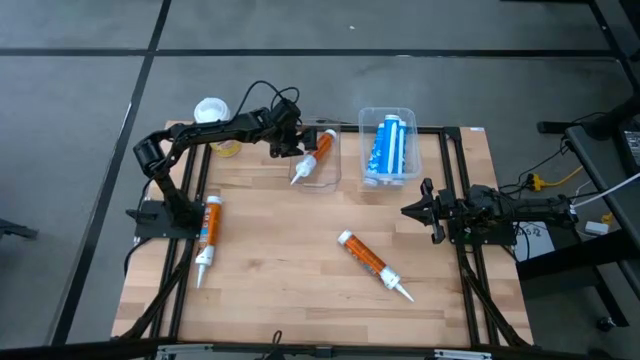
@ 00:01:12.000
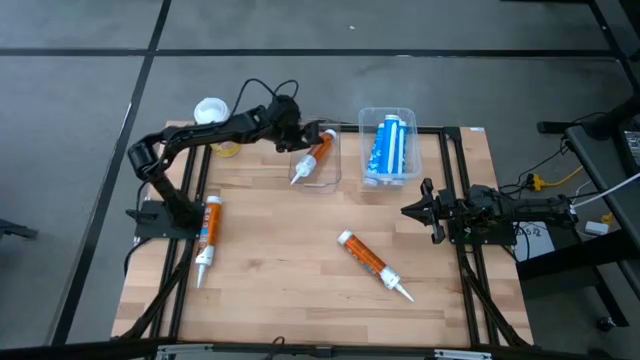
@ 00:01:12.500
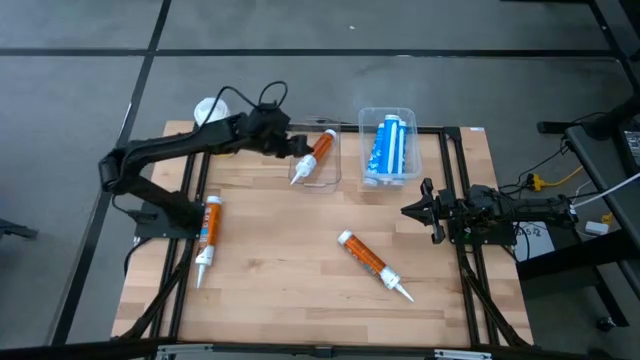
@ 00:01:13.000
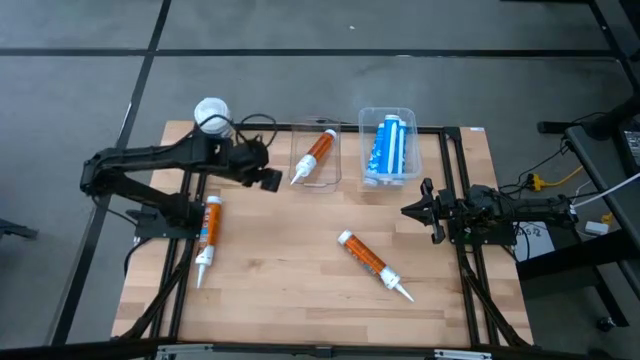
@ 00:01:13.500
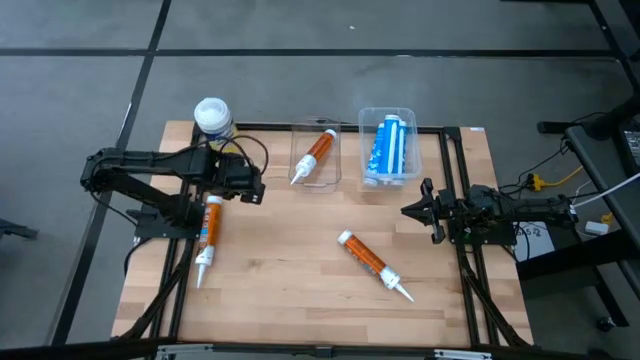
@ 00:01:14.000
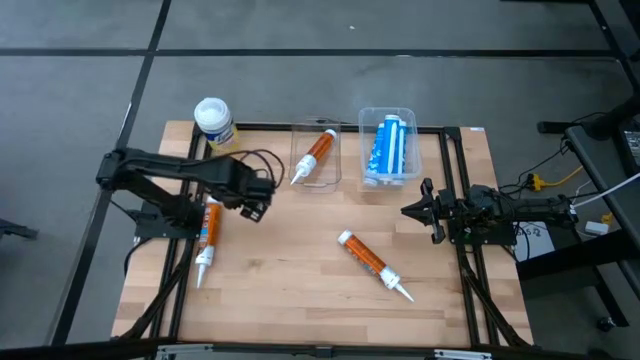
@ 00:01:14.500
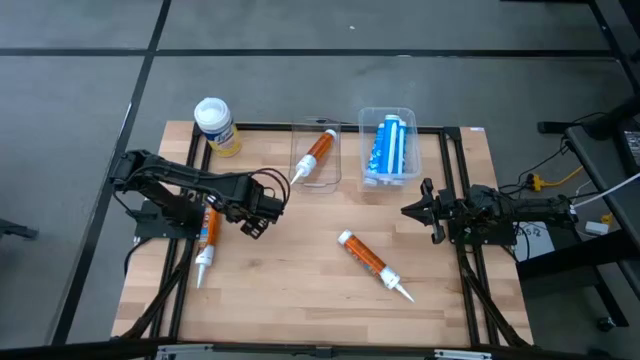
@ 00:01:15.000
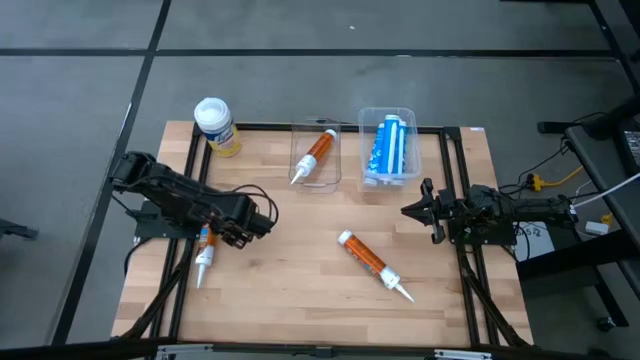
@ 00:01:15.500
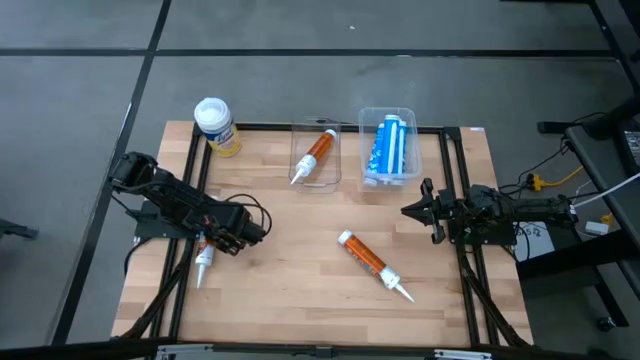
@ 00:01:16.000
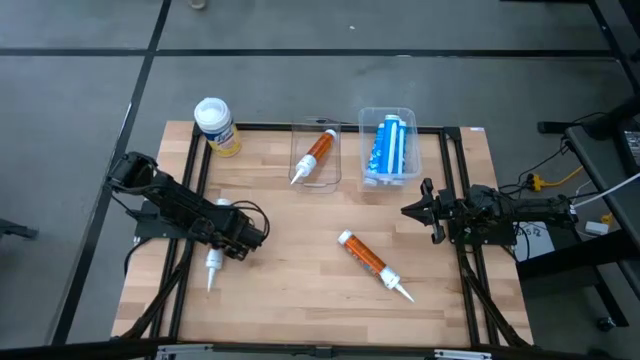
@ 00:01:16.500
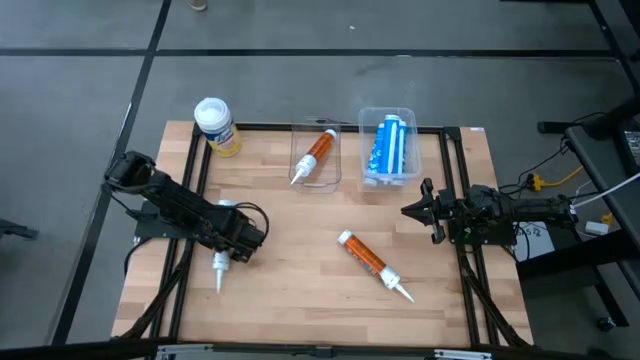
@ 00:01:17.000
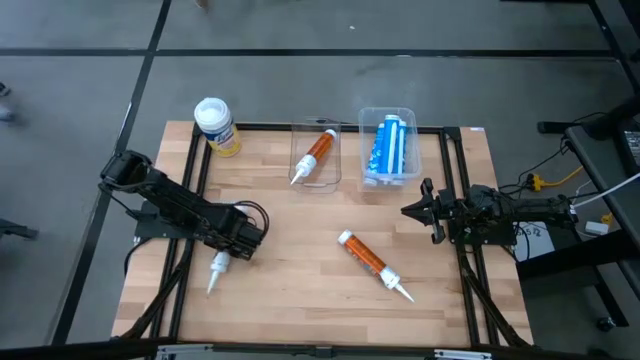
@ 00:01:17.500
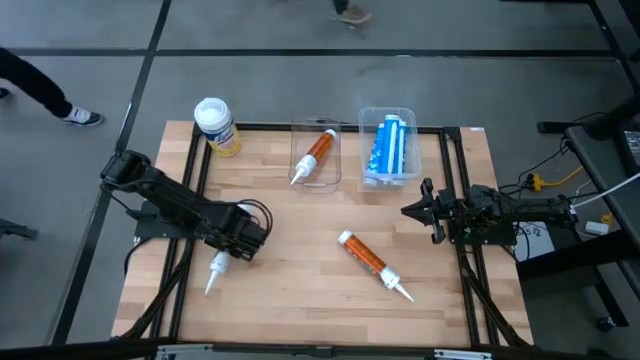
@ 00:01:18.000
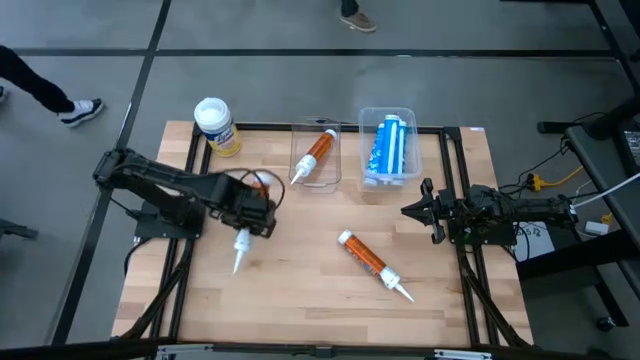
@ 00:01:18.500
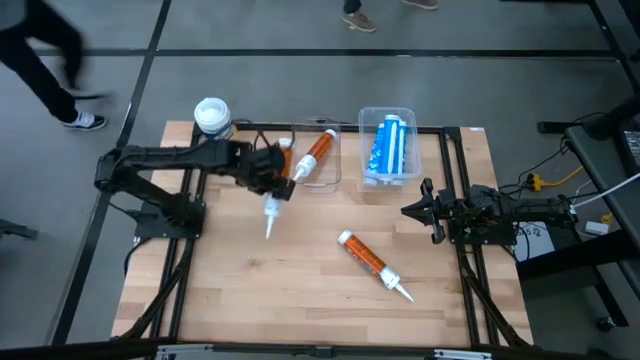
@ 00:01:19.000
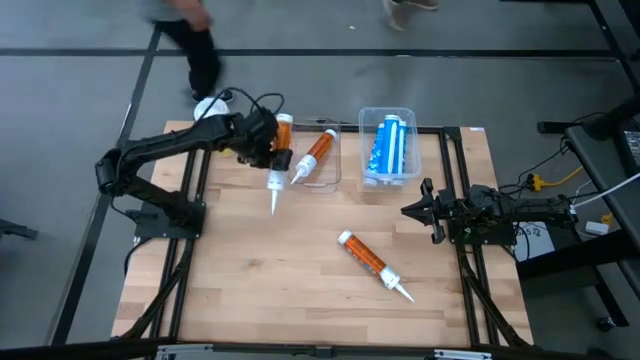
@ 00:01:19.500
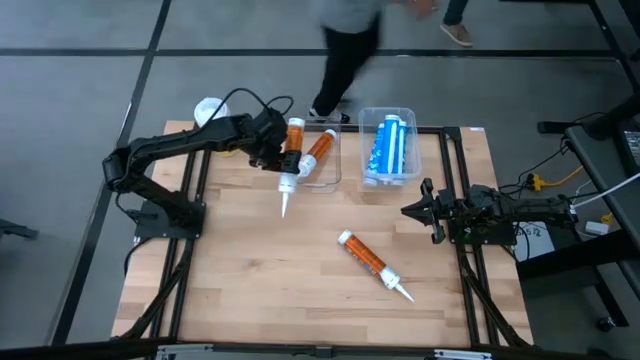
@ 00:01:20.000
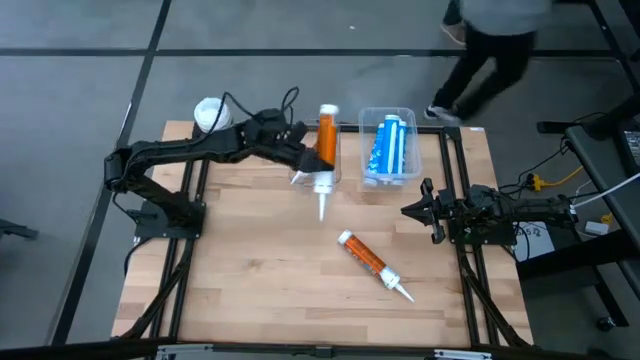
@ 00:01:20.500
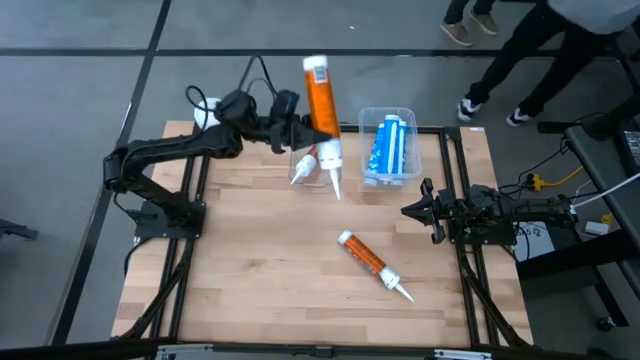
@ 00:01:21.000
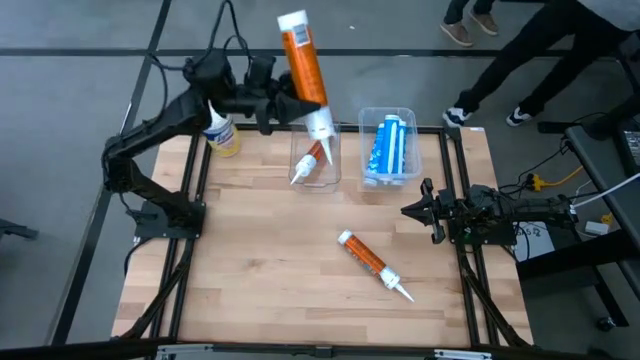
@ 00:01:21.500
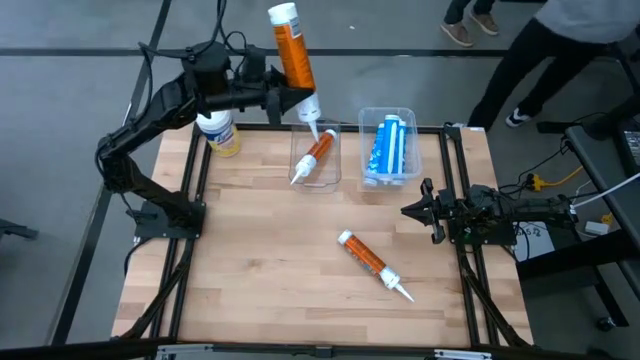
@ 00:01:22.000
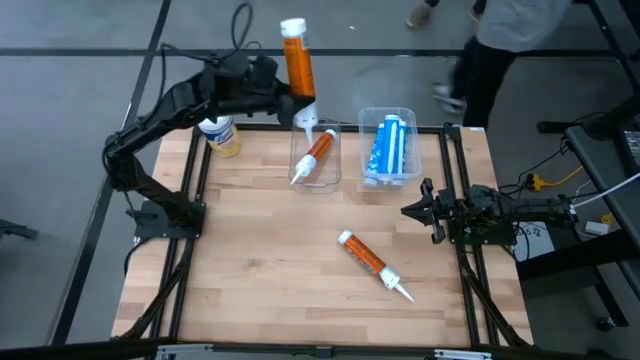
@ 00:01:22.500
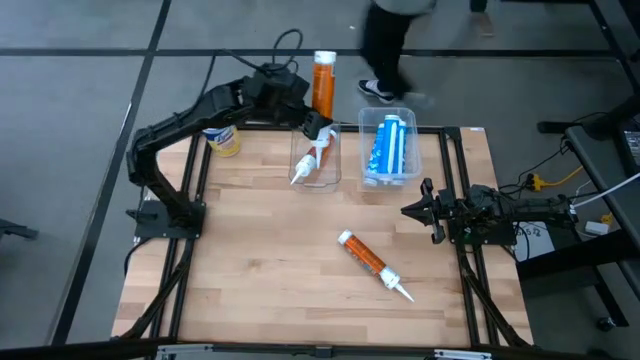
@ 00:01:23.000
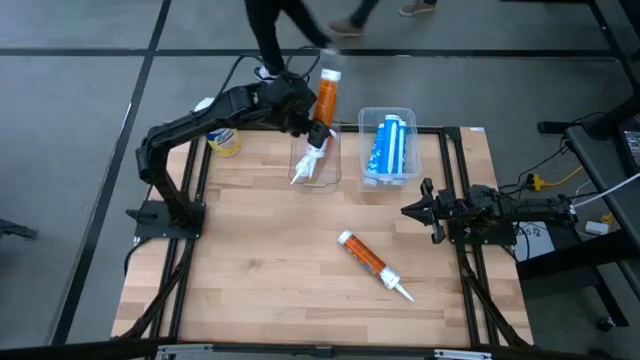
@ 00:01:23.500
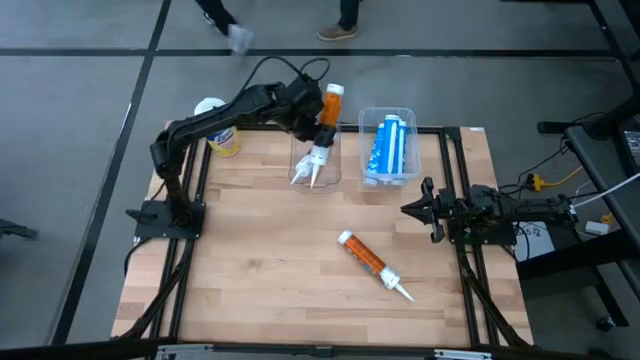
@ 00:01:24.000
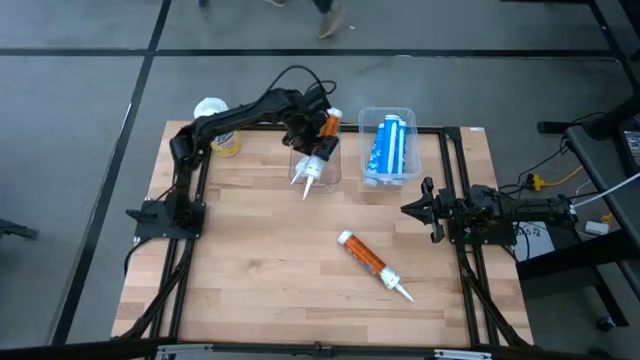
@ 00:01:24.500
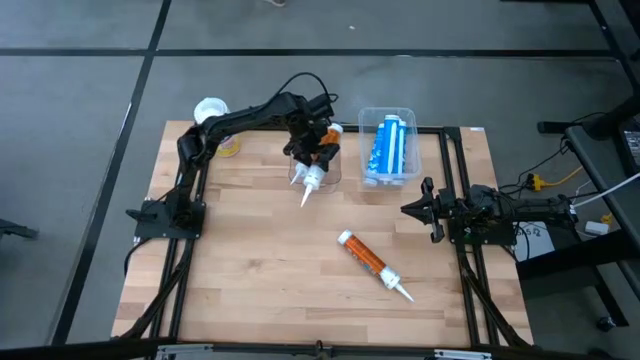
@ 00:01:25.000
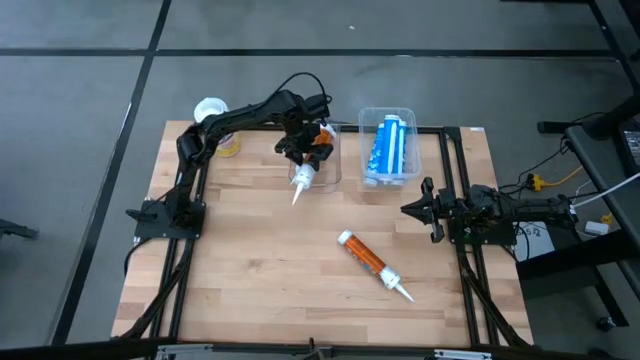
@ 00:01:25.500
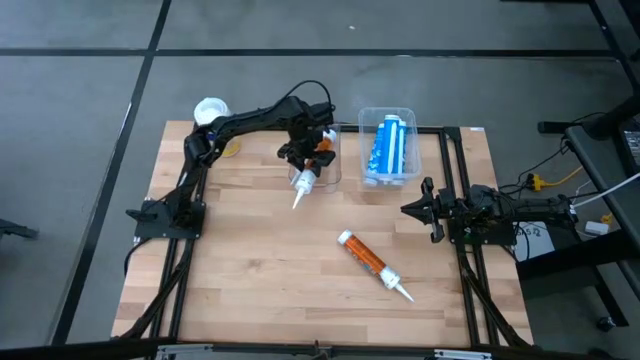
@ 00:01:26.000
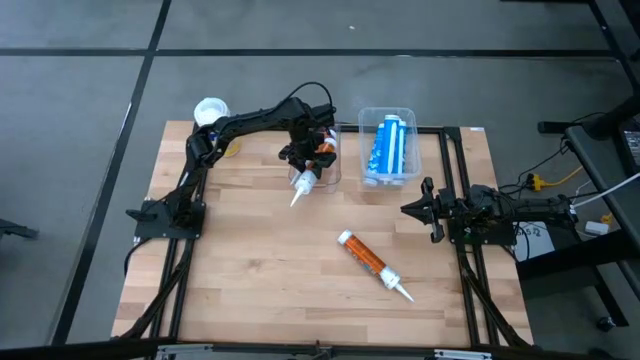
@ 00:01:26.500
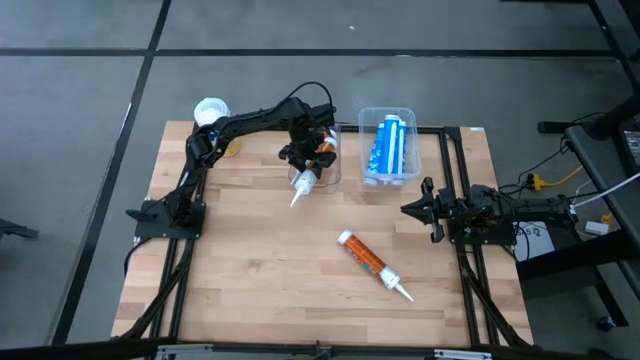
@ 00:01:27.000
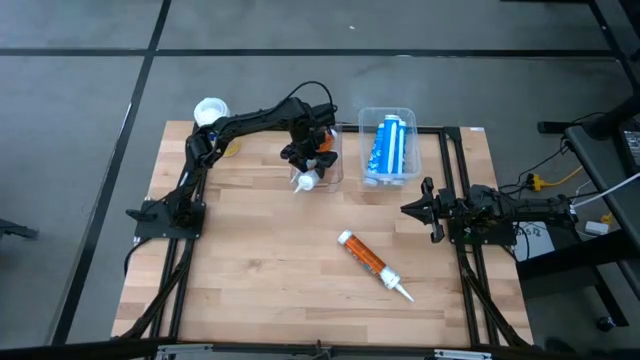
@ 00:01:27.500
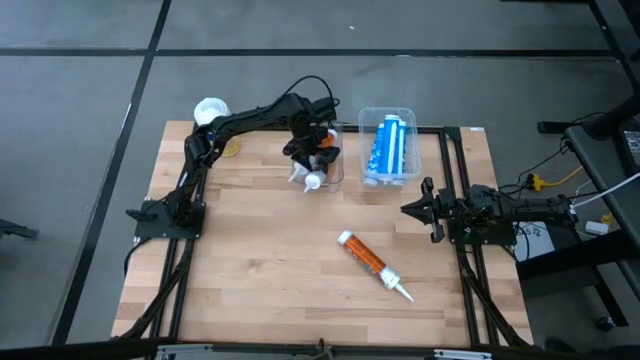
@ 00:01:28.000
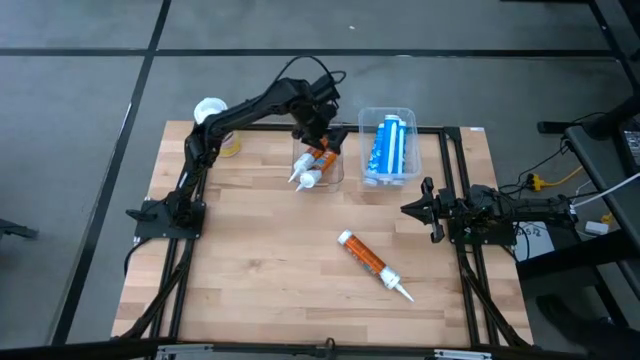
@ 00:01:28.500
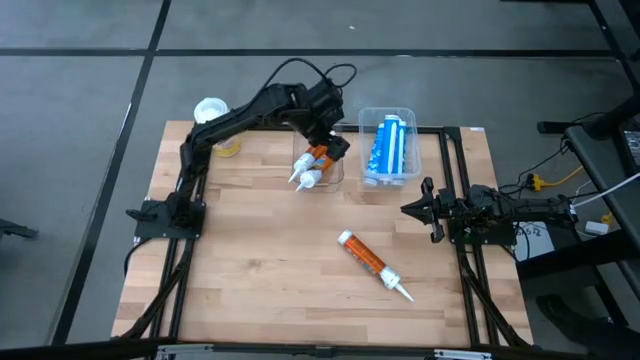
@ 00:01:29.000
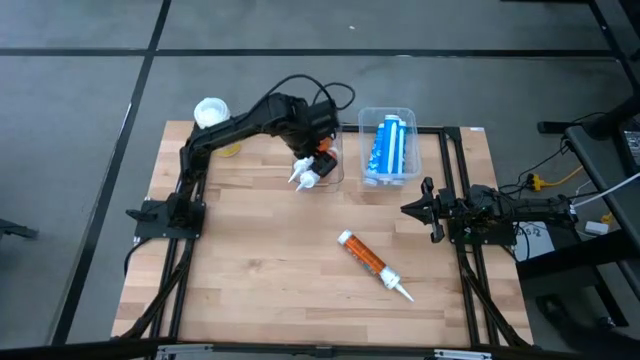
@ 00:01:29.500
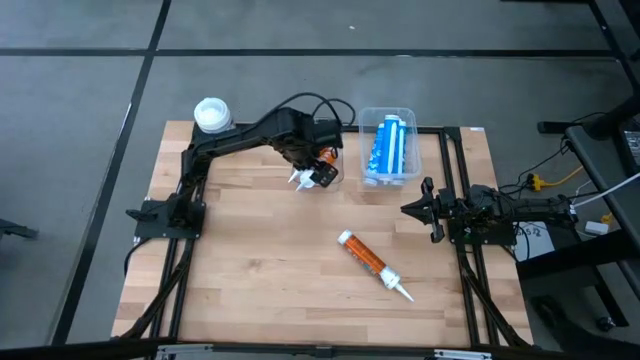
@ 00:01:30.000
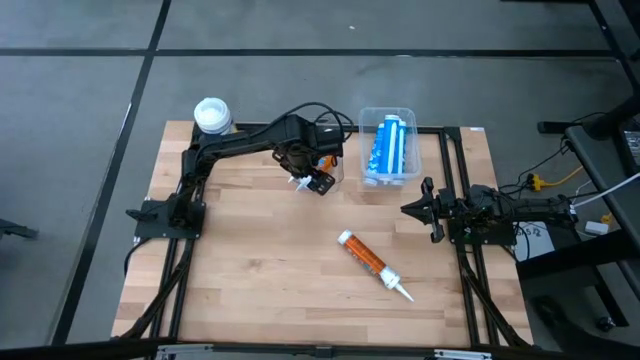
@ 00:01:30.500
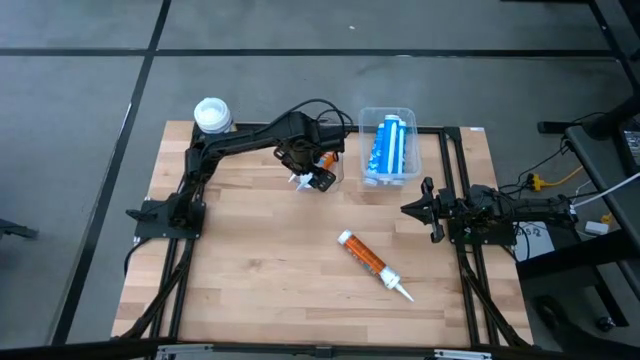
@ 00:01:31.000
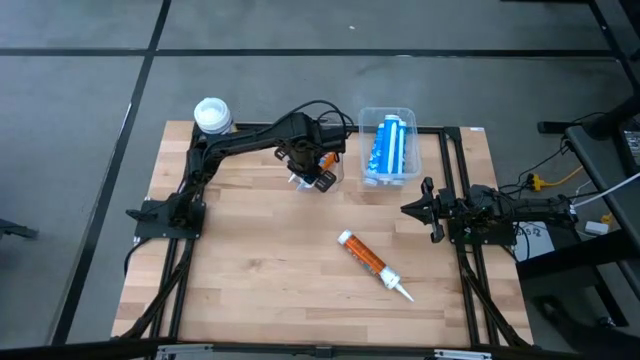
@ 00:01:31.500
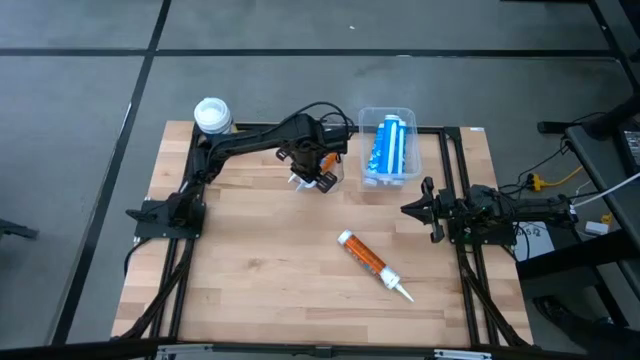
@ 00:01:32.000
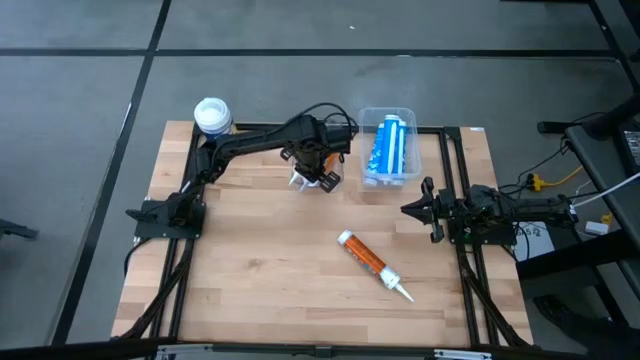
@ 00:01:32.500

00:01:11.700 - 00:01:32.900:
Task: Pick & place silicon tubes, Sealant and Lysol wipes
Put the left orange sealant into the left transparent bin
